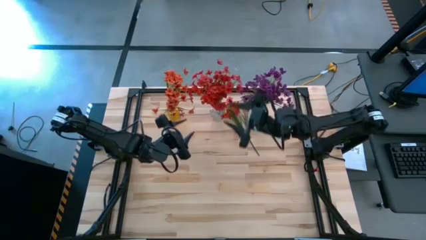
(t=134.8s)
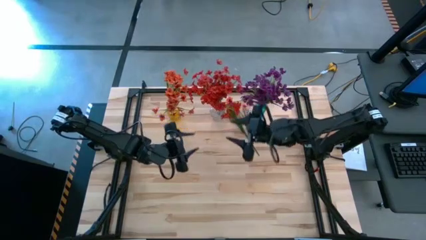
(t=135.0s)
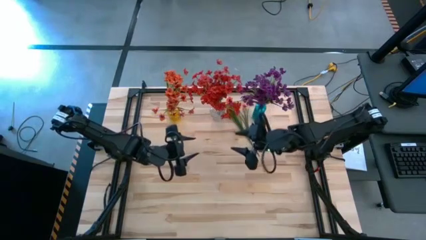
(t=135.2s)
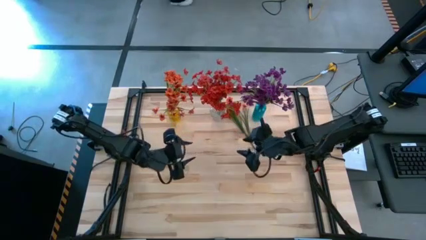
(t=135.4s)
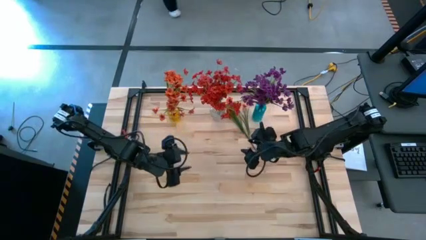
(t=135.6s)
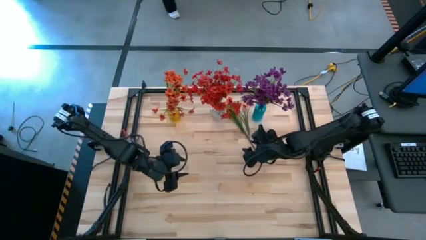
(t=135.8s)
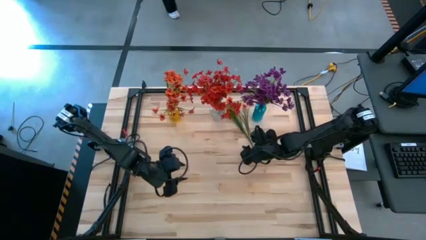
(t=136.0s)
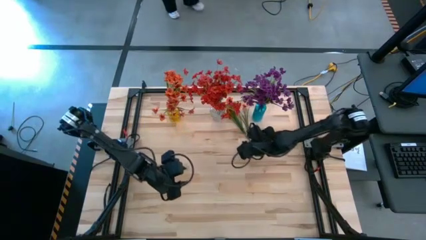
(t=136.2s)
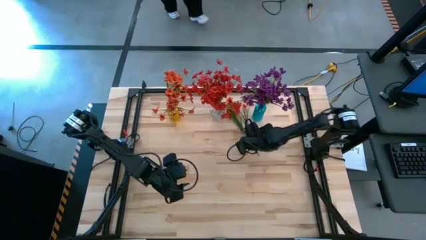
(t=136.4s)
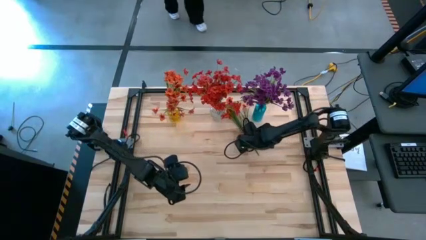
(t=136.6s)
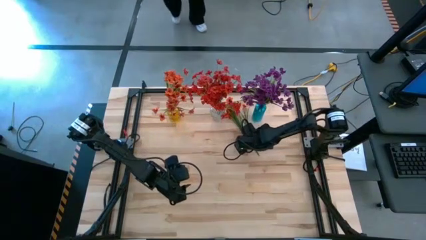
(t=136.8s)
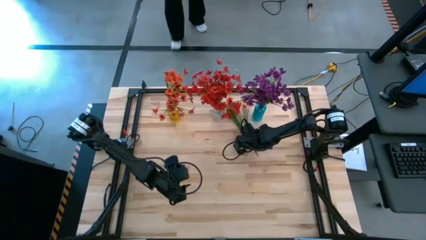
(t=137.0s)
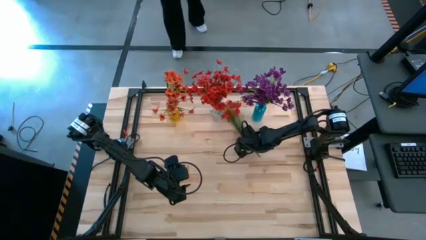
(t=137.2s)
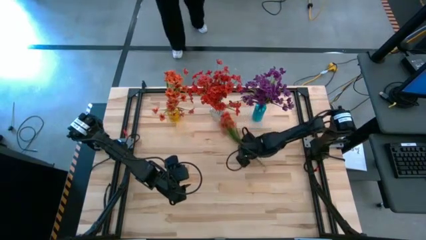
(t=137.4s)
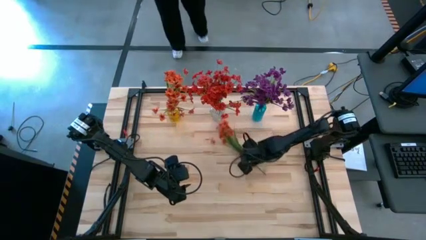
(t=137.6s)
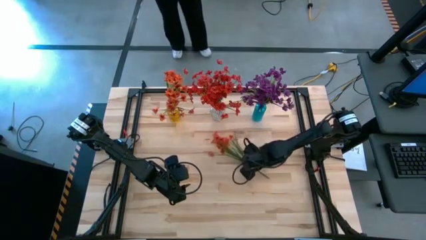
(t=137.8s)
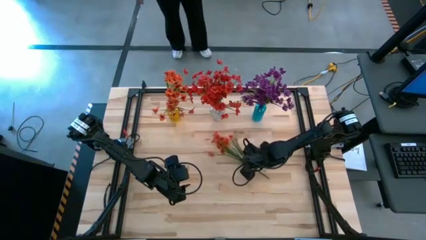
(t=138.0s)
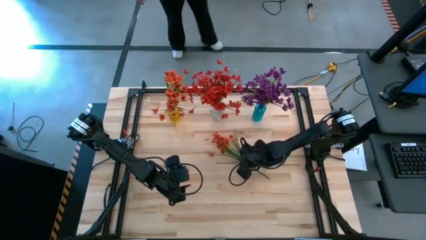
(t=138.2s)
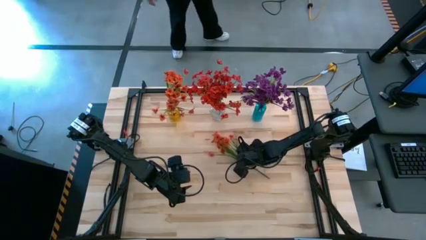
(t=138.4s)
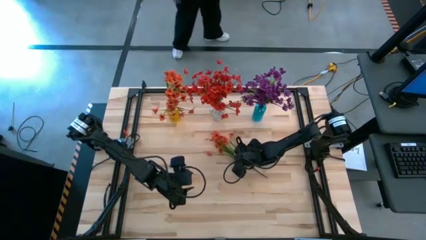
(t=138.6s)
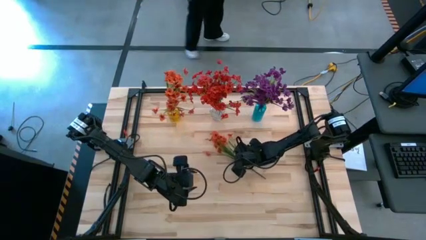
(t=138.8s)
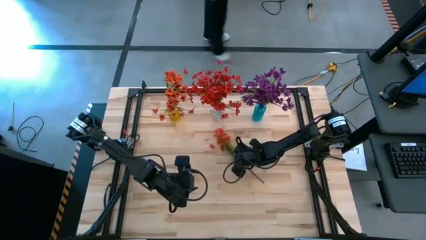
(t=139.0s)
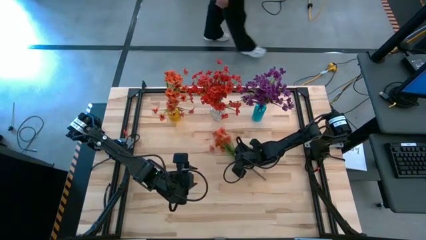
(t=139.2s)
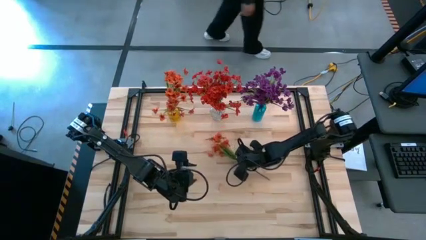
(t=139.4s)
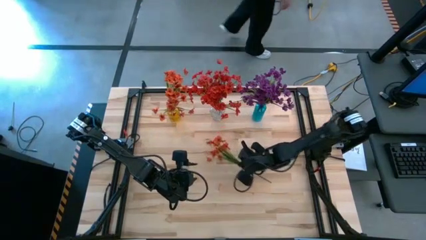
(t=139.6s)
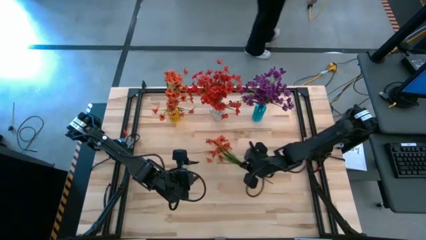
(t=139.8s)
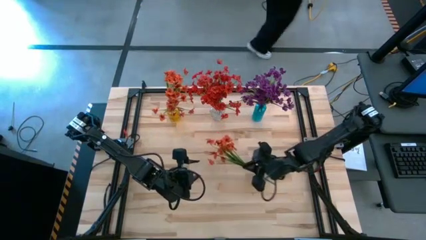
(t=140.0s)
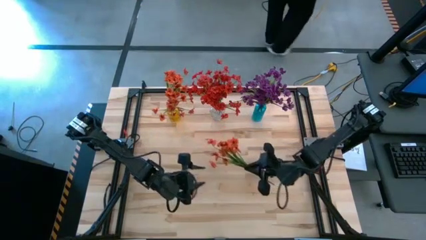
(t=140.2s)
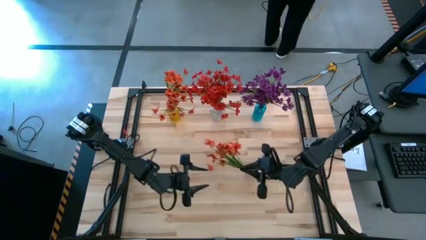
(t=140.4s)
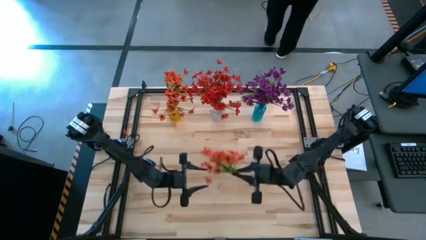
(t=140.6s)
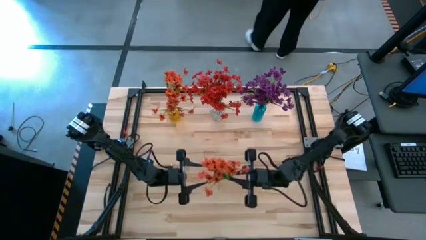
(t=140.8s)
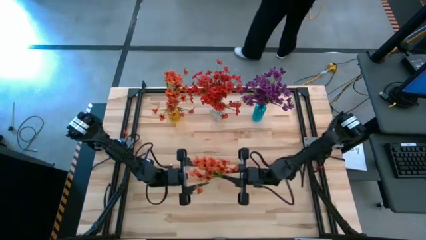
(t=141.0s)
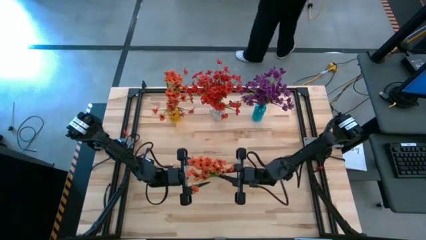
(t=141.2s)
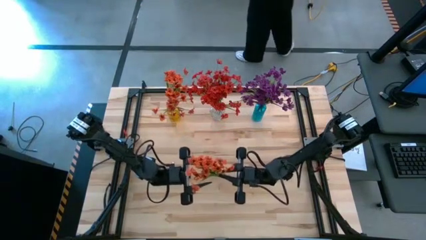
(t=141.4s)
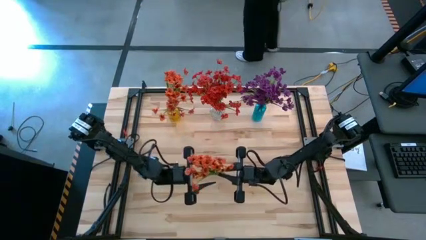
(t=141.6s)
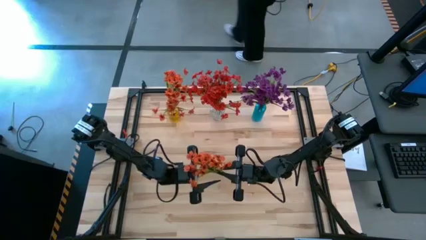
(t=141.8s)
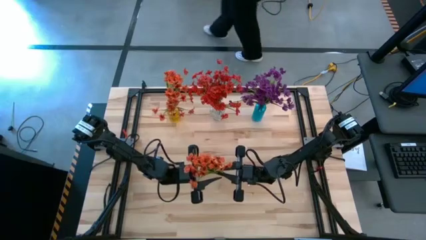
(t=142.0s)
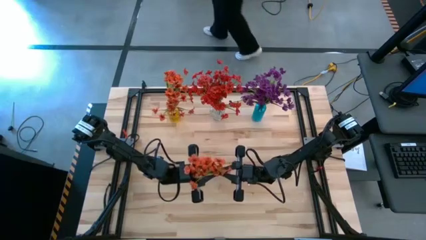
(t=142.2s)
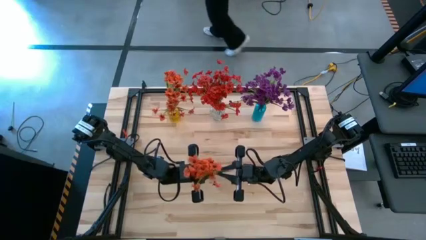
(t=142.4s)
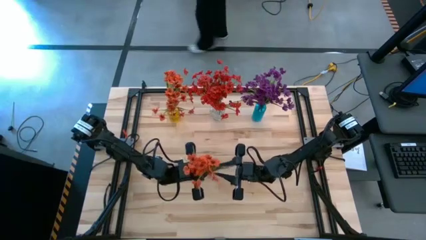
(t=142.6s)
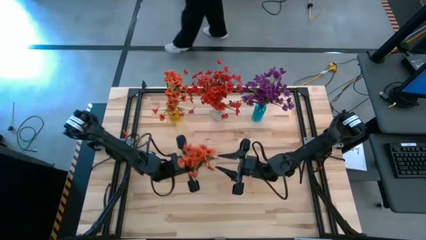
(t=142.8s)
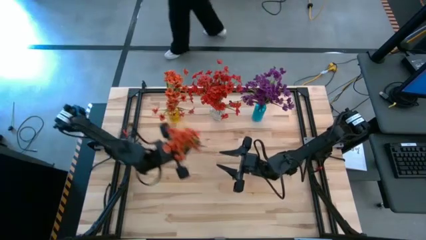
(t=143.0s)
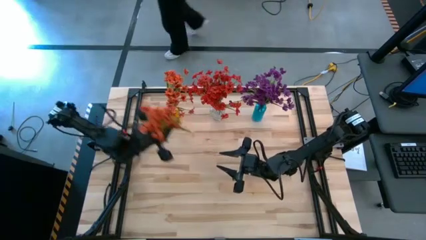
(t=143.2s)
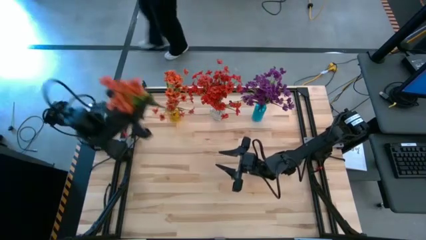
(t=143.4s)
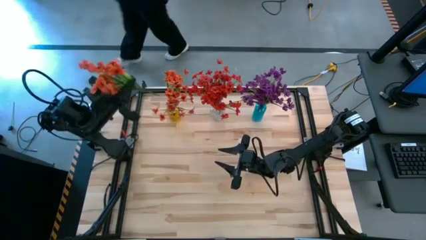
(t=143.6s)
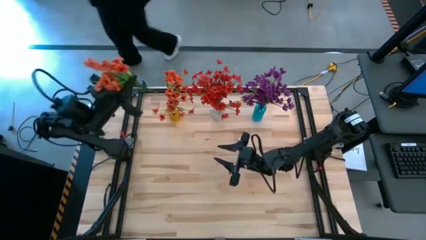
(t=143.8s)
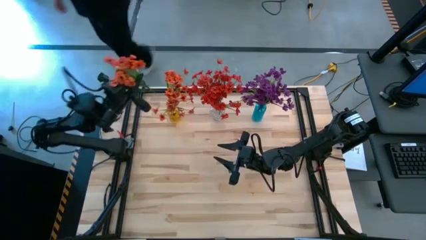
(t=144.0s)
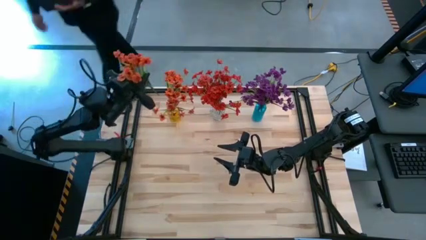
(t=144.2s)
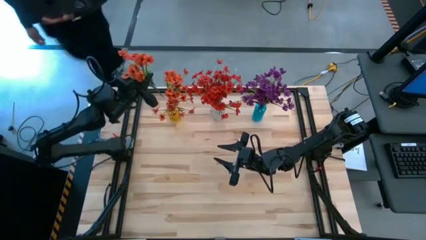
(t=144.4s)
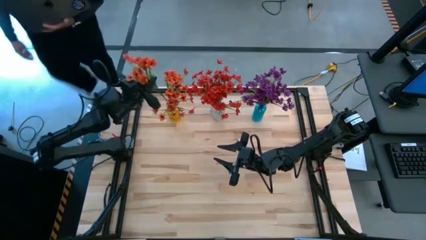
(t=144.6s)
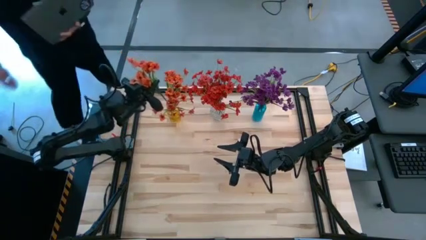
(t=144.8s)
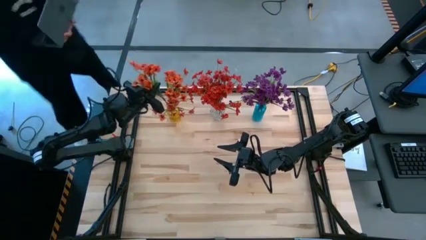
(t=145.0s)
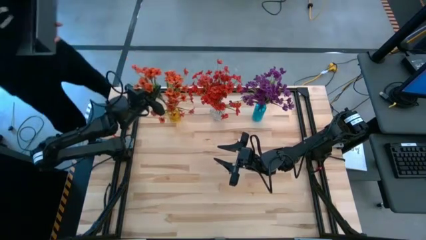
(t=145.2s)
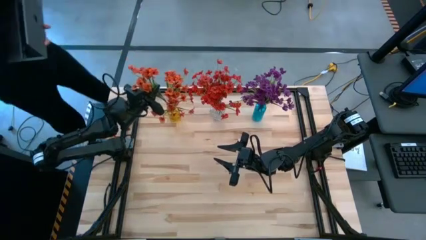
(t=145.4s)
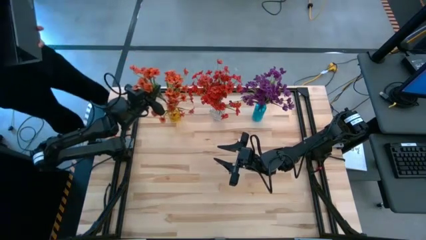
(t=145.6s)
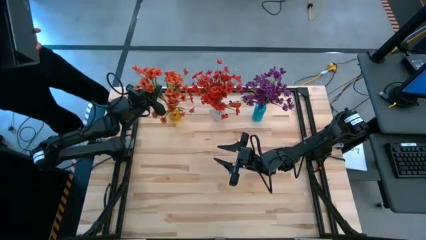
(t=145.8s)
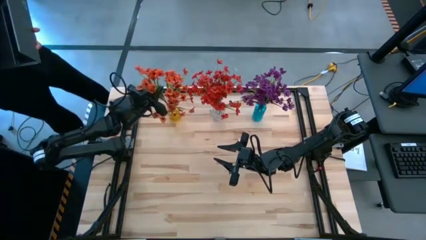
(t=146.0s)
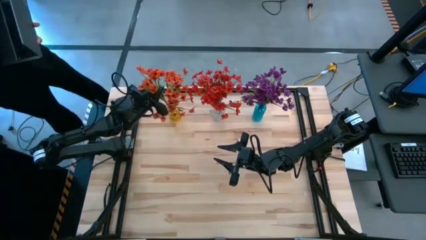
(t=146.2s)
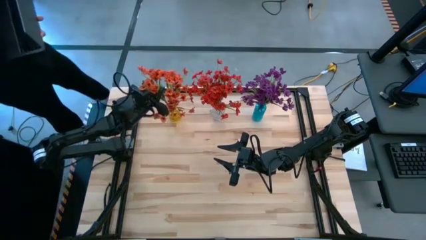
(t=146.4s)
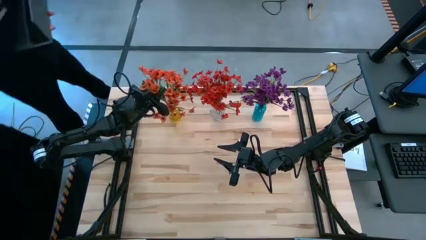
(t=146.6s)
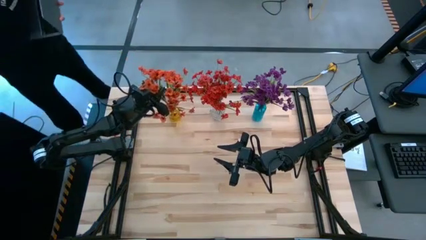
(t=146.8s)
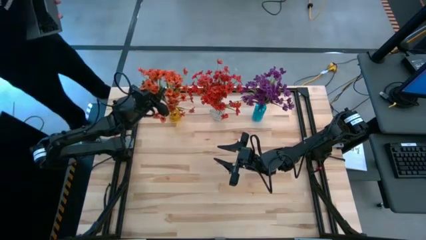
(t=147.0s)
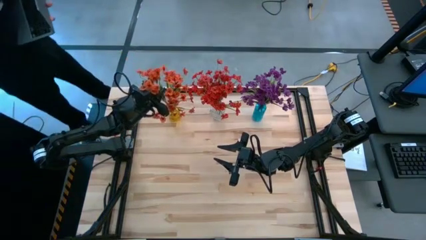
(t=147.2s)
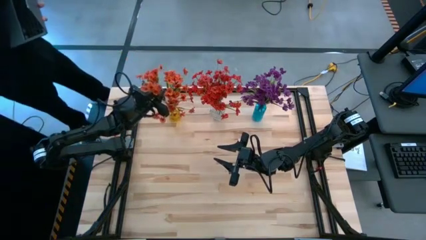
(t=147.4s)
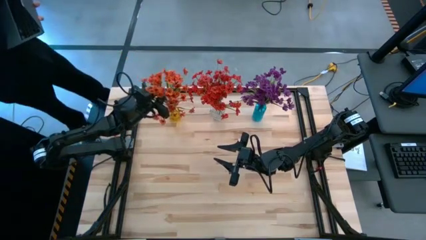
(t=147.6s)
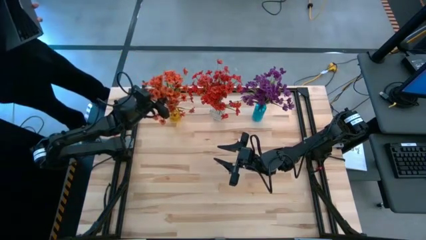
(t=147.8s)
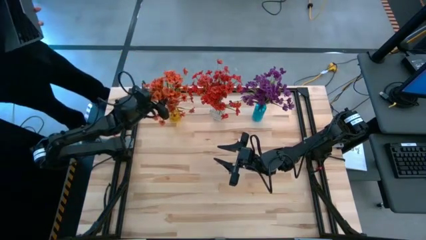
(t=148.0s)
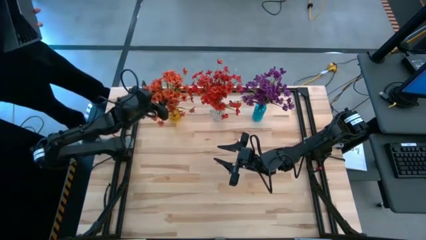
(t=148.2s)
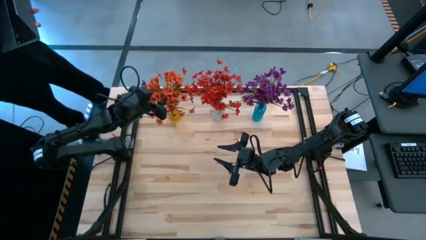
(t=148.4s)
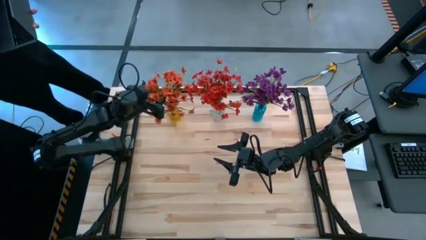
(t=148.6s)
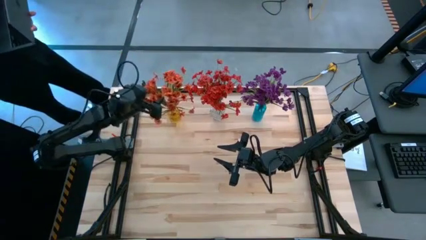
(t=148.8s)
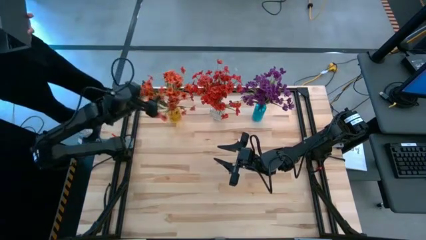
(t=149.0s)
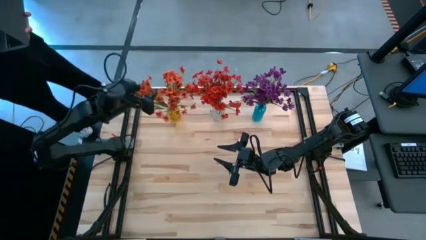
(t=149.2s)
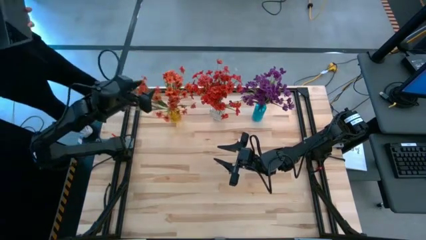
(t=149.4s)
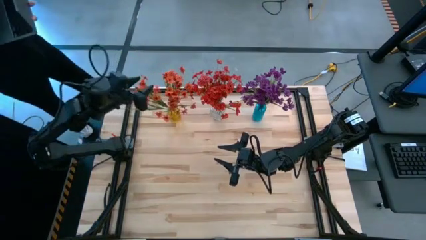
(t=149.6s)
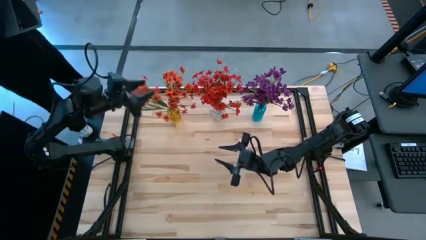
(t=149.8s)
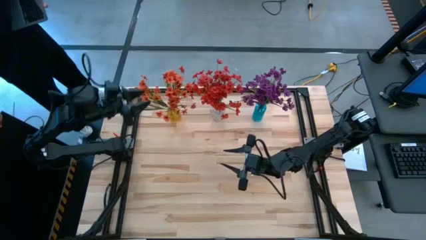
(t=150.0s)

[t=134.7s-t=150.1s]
Task: Sort flowers into vase by color
Put the orange flowers into the yellow vase
